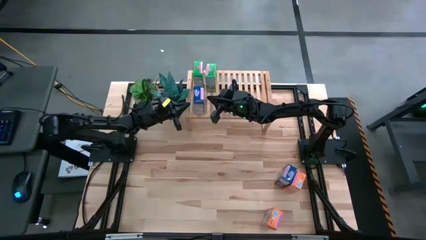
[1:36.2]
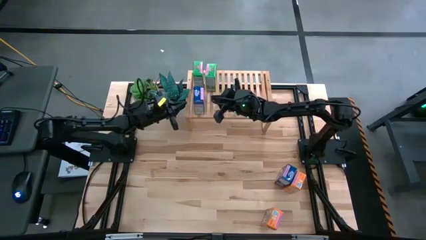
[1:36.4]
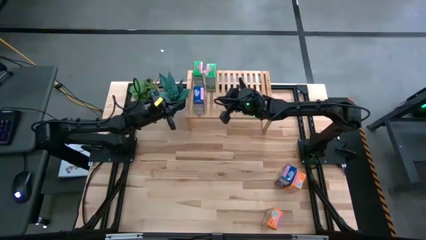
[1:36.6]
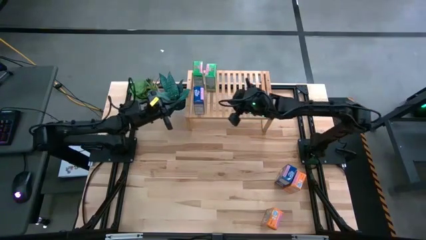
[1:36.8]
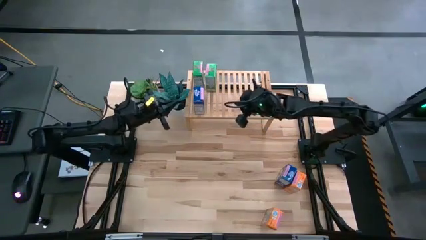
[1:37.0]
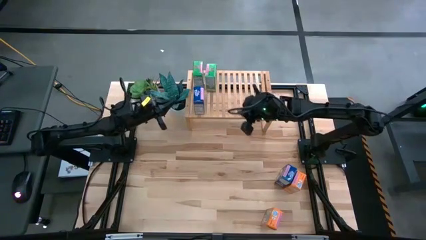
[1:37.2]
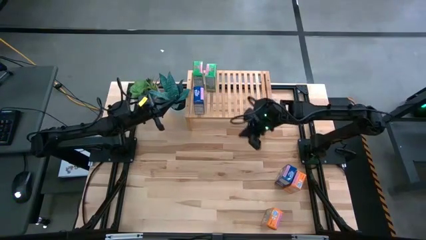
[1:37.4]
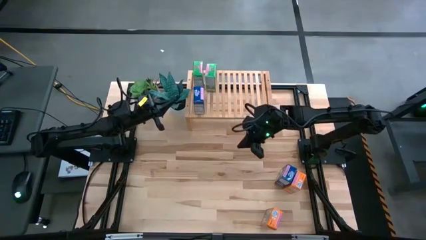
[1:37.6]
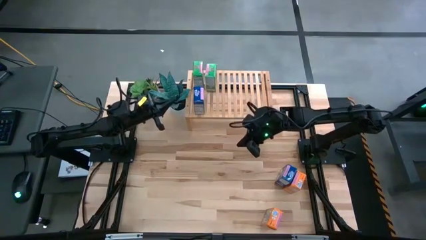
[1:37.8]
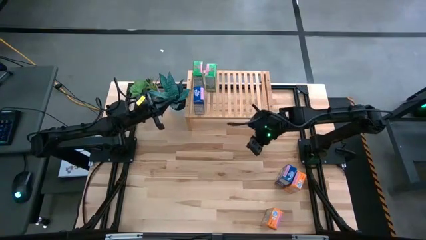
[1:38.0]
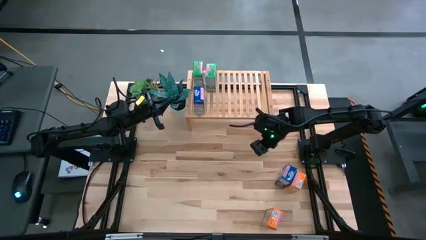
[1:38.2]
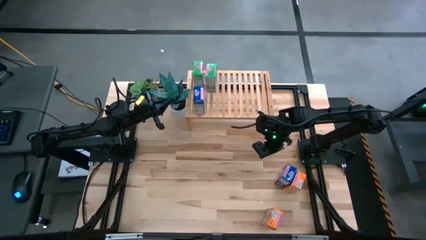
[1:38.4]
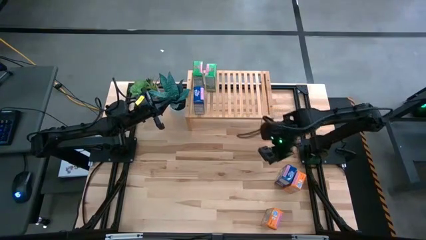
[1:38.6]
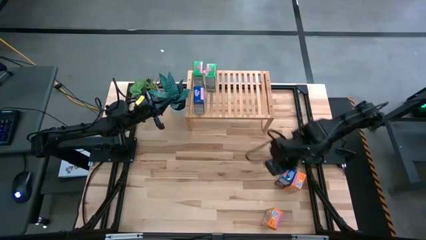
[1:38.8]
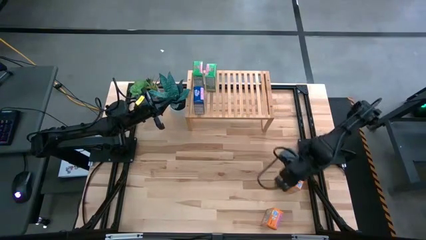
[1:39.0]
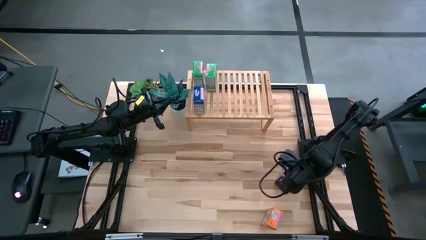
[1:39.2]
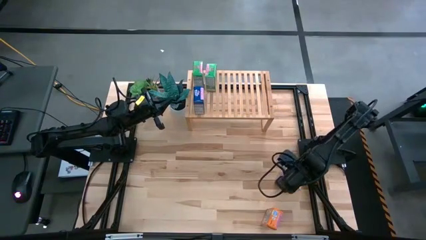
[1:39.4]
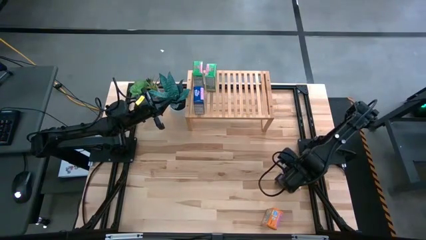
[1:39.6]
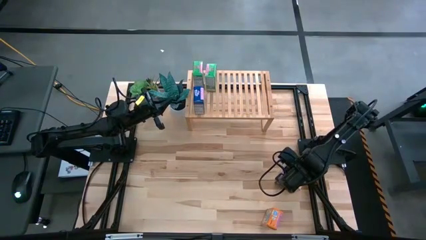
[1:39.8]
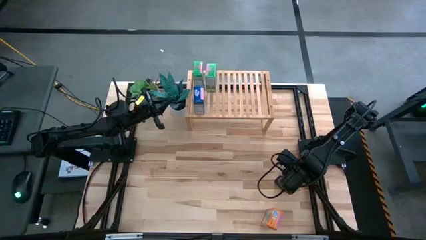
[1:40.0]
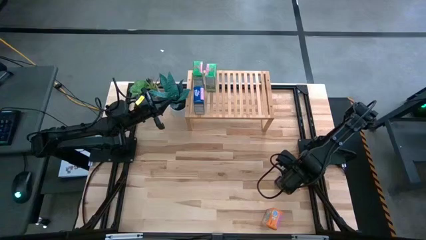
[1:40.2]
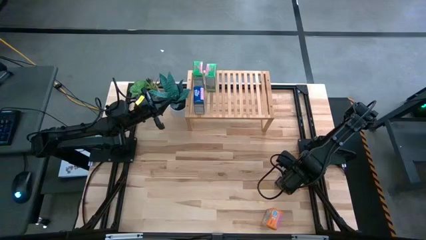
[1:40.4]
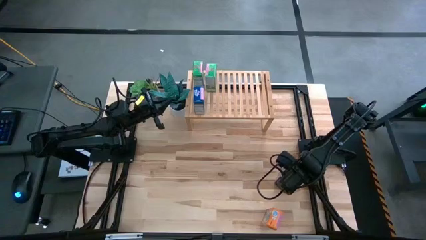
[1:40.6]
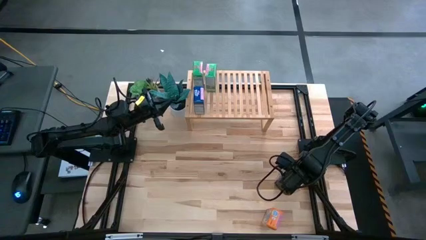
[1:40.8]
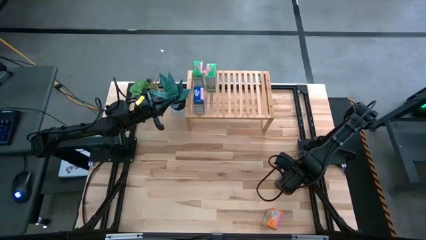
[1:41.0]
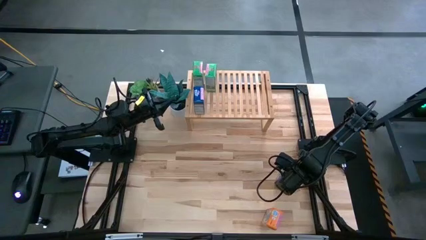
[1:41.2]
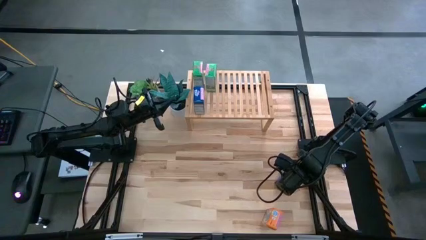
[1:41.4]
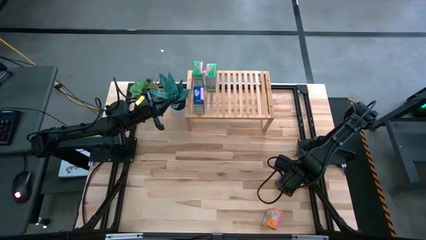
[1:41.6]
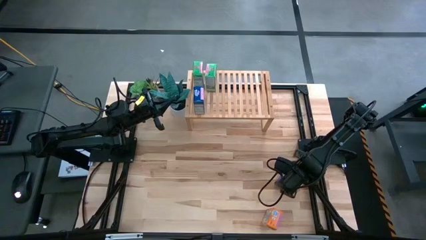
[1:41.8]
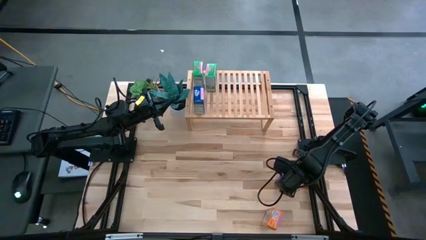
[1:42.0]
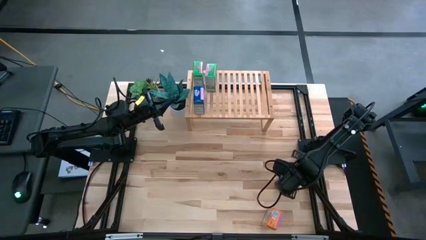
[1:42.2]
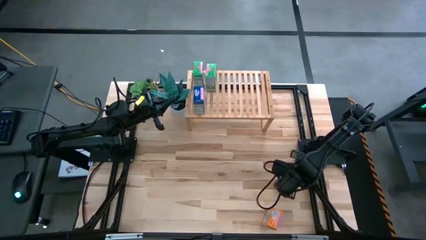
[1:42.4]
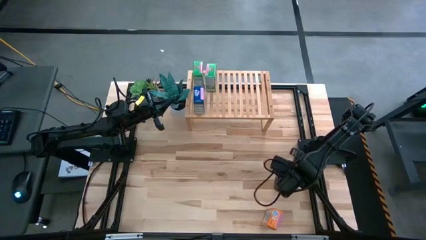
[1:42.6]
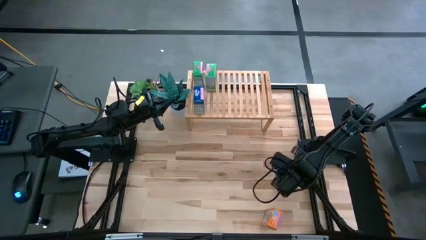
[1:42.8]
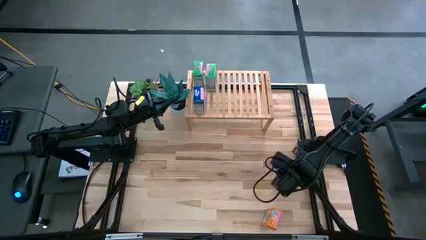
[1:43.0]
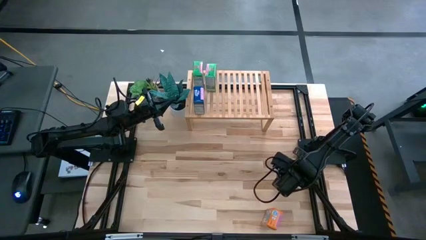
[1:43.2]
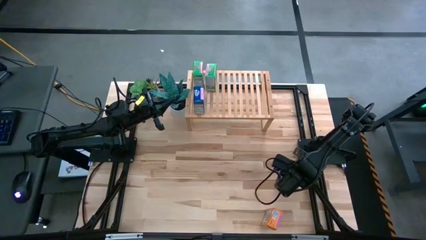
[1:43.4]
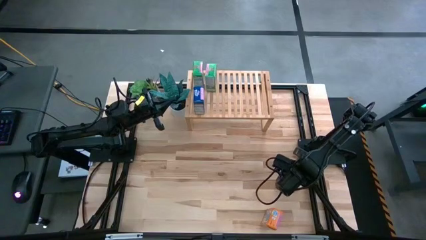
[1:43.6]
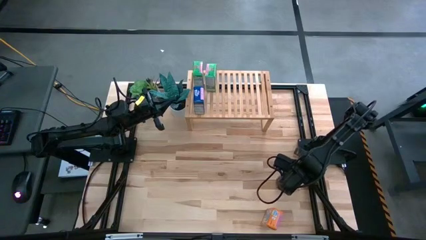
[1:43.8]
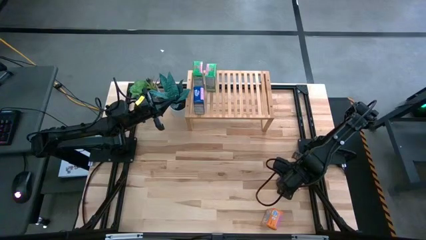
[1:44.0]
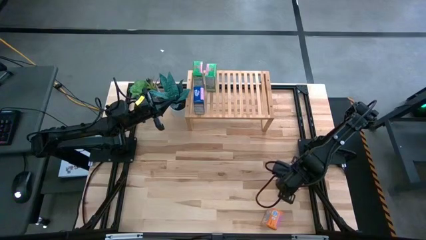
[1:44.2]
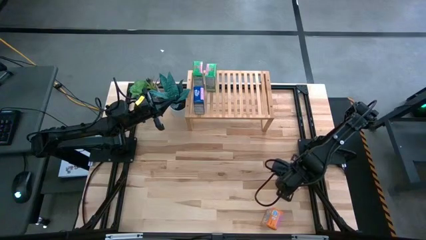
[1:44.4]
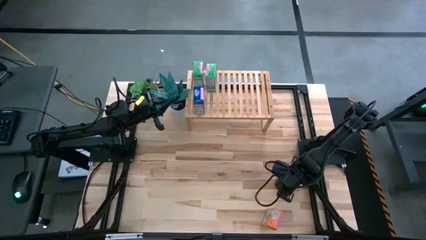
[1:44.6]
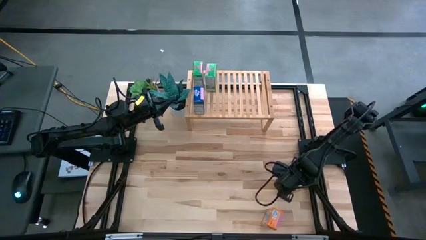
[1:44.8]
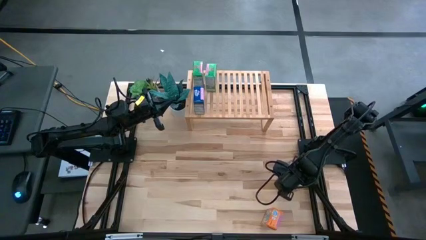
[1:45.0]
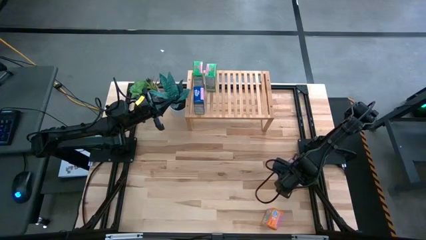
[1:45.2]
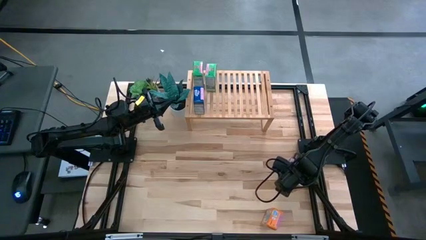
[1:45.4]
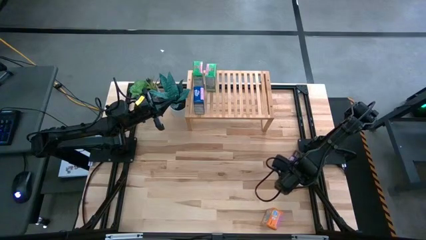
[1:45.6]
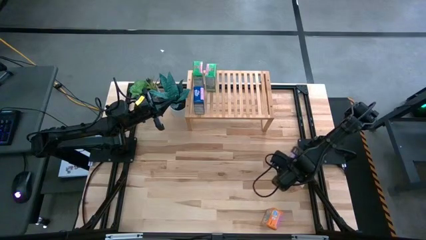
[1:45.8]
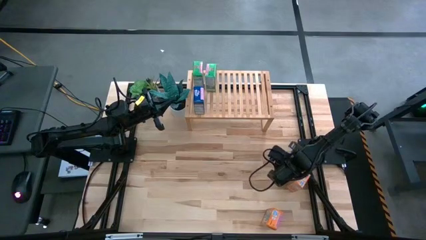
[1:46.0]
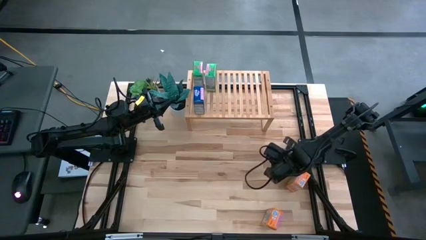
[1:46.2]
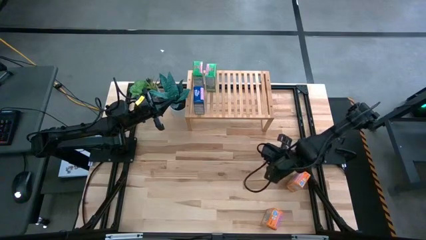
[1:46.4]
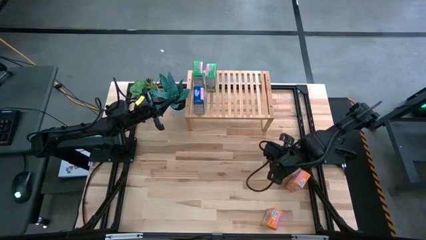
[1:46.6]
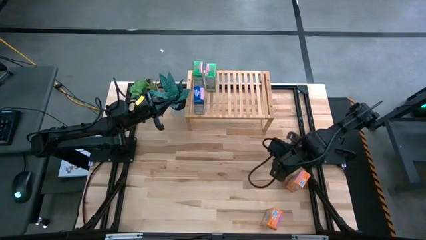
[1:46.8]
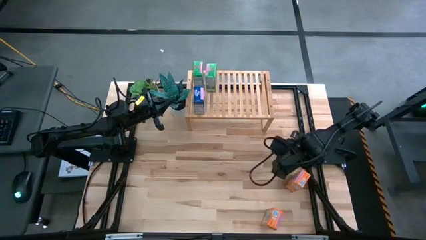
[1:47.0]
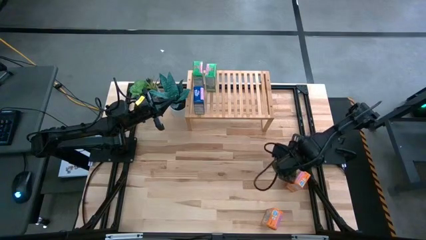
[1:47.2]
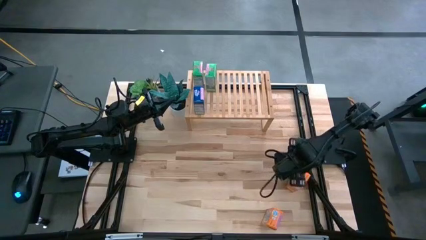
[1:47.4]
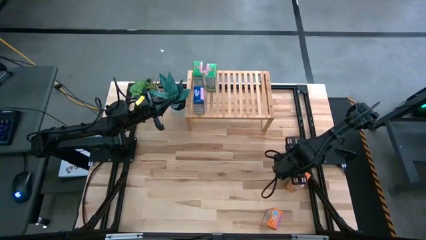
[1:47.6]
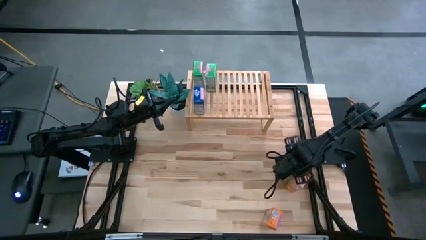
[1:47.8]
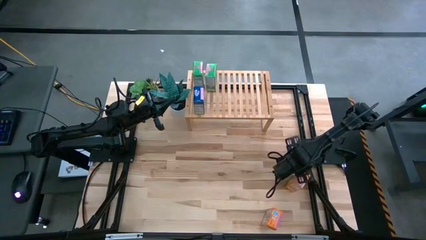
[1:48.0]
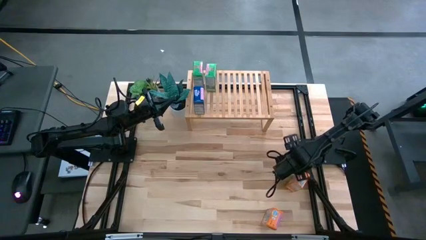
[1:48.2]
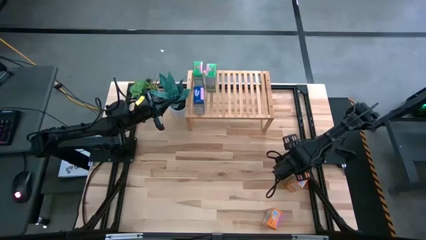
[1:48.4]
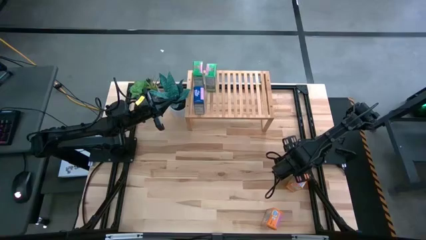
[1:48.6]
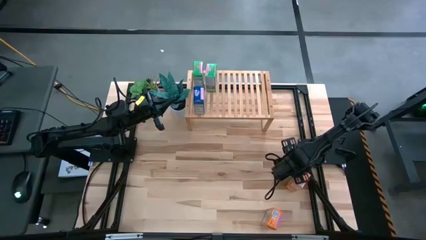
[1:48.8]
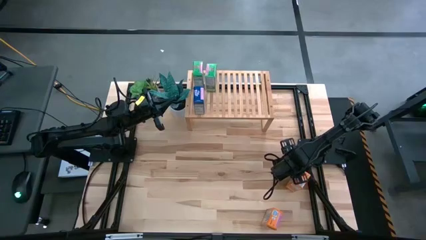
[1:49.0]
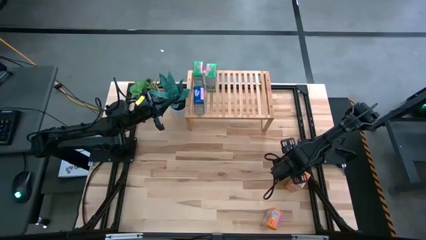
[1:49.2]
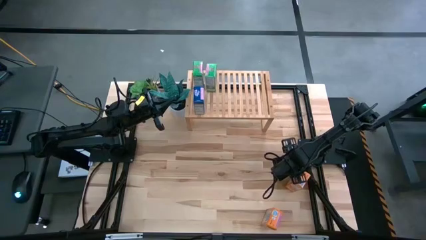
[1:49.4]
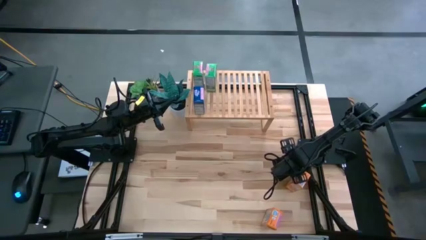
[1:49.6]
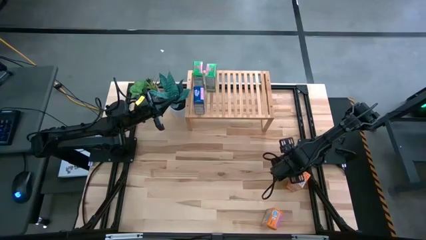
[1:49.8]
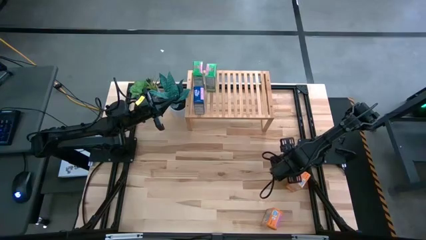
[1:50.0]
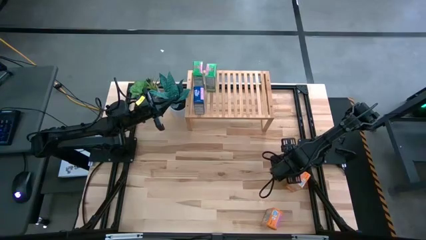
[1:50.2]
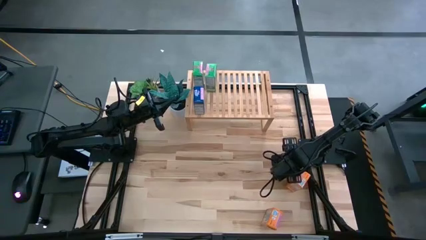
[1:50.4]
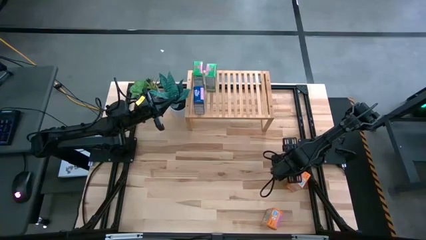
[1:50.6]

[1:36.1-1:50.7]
Task: Stack cereal on shelf
Put the blue cereal box on the shelf aligned with the other blue cereal box

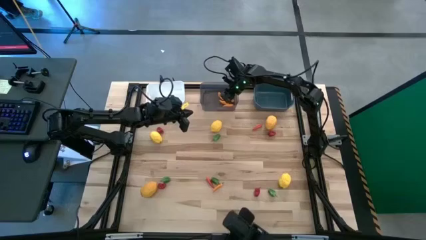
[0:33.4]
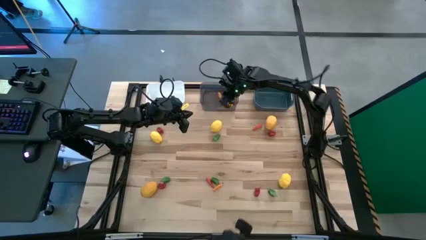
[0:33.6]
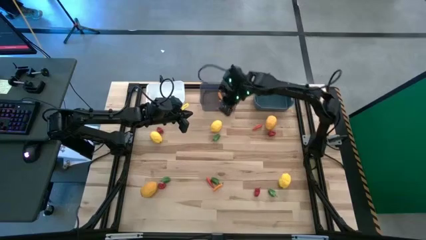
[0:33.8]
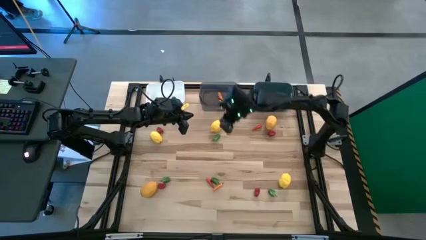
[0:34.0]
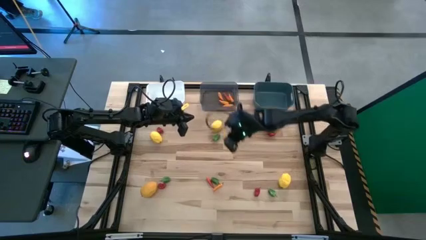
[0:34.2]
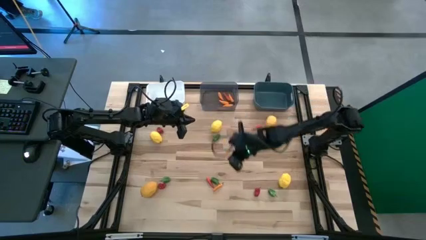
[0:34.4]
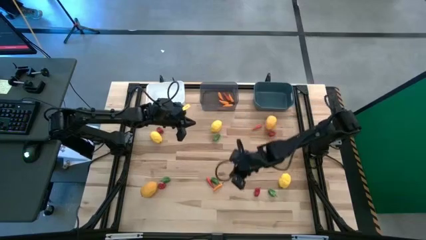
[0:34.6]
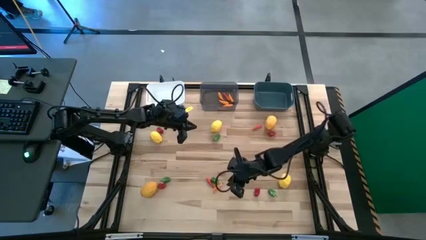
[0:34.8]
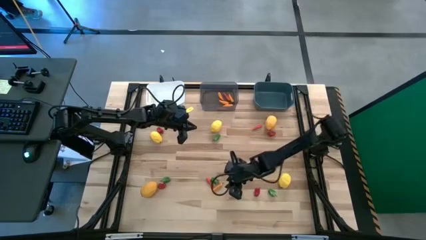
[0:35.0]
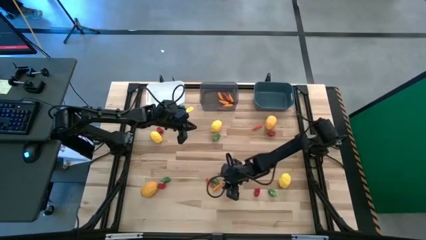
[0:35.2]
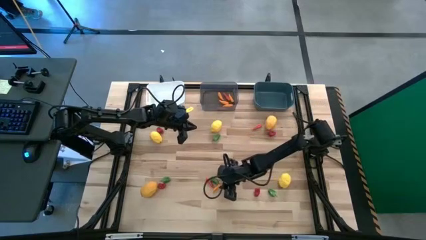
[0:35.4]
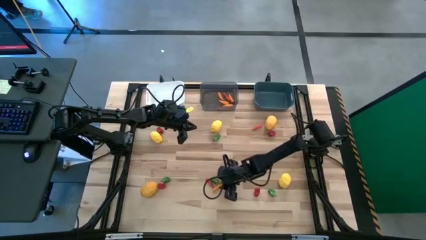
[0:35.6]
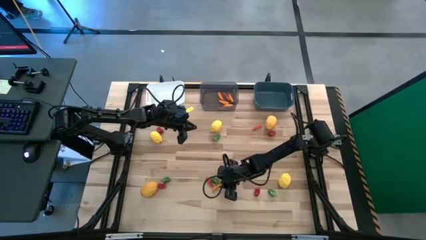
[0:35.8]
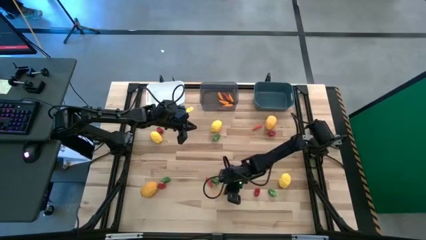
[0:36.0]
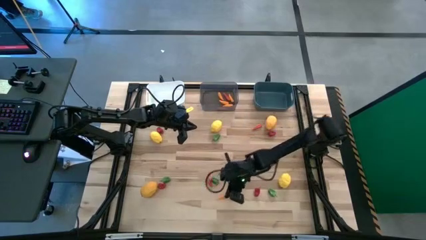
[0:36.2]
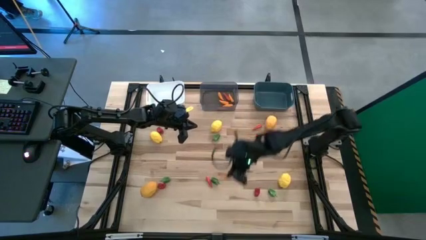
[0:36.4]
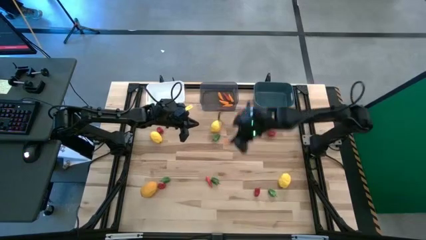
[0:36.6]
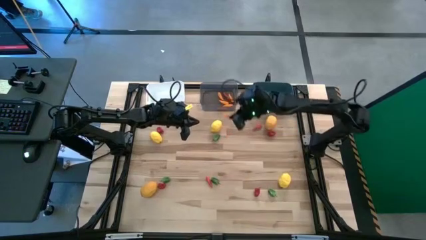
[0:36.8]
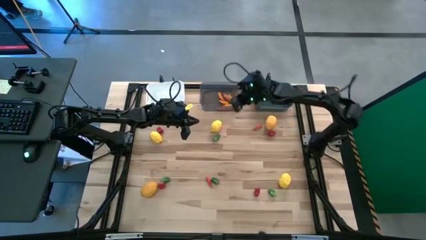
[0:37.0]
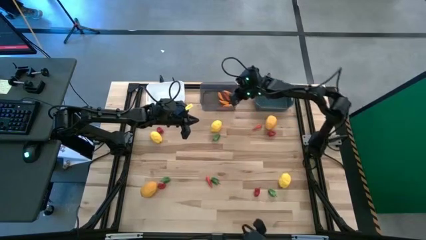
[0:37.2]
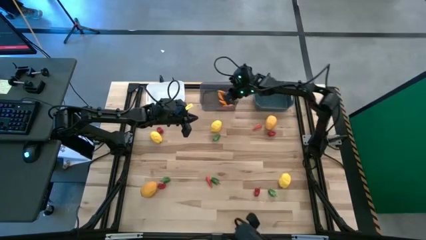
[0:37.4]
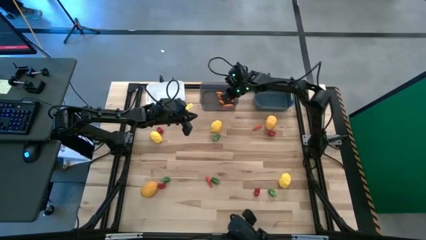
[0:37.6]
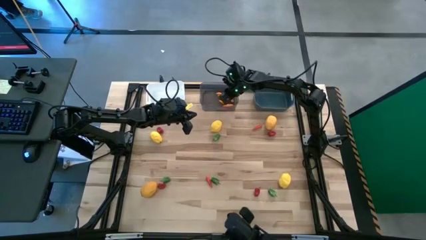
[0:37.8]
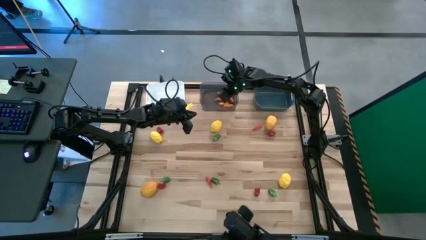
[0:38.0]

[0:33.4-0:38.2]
Task: Sort produce into baskets
Put the yellow chili pepper into the black bin
